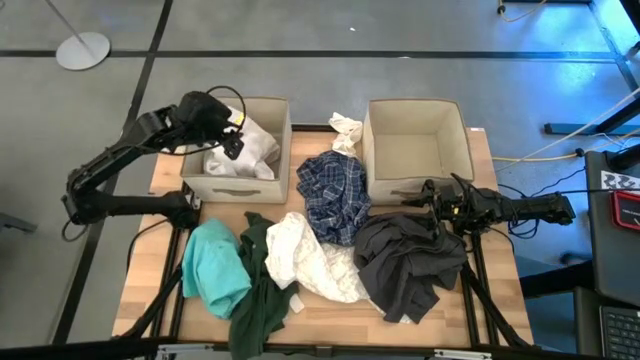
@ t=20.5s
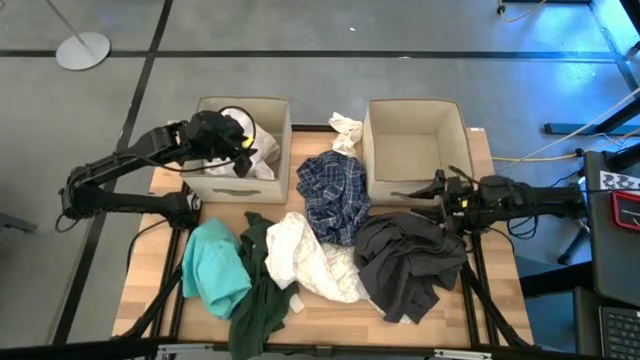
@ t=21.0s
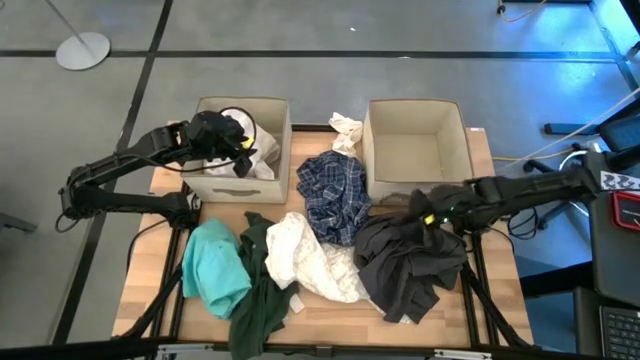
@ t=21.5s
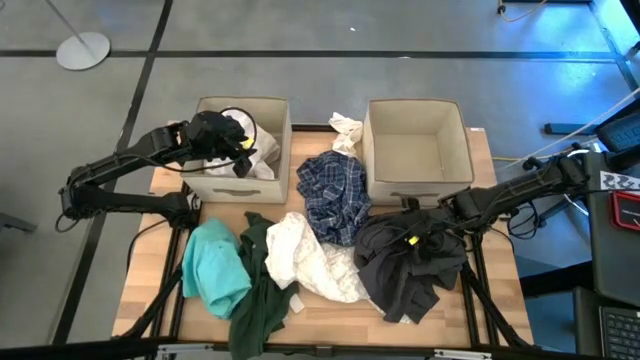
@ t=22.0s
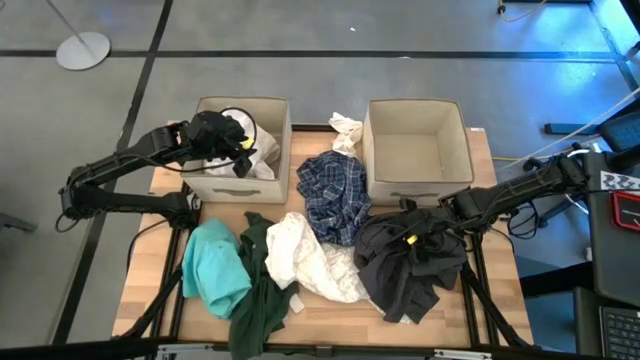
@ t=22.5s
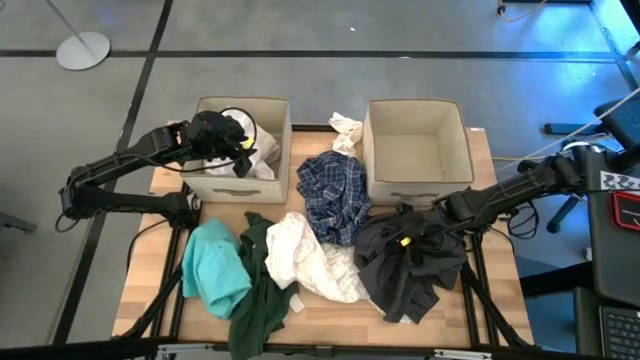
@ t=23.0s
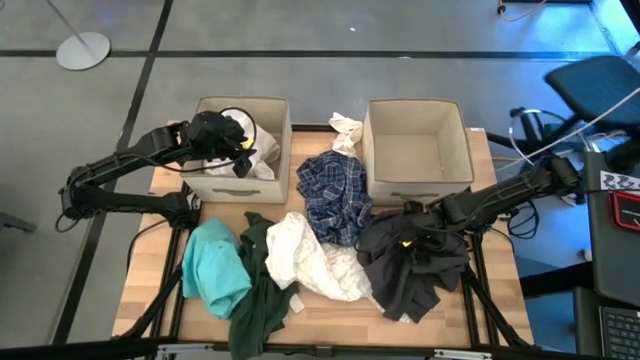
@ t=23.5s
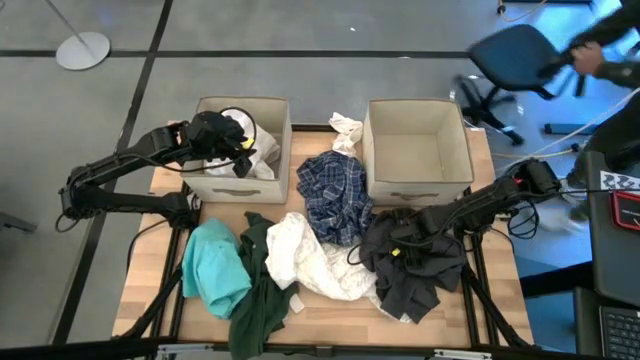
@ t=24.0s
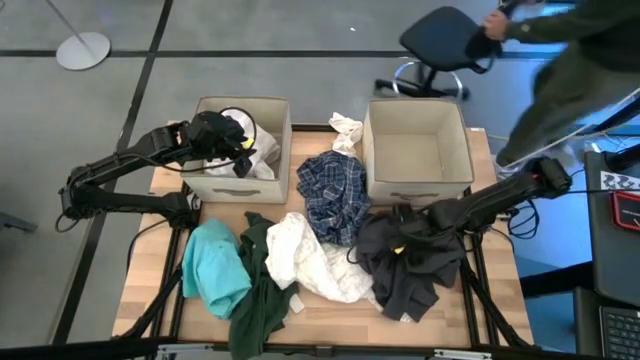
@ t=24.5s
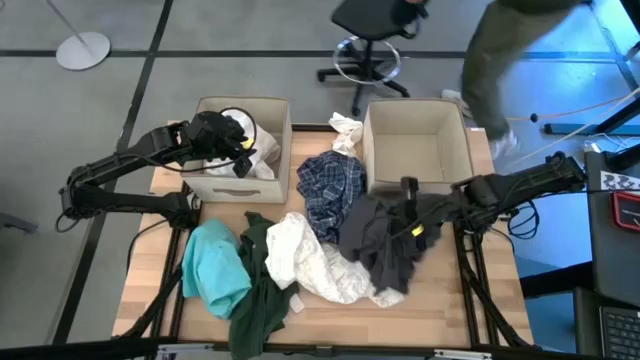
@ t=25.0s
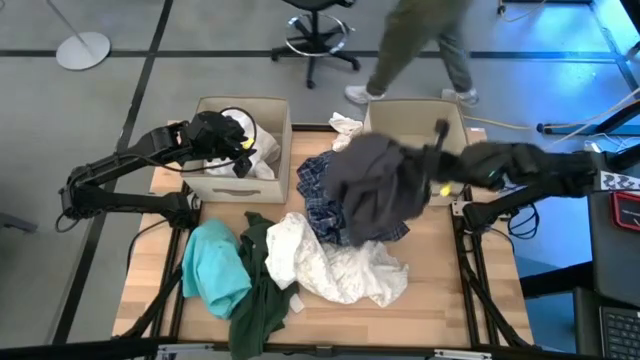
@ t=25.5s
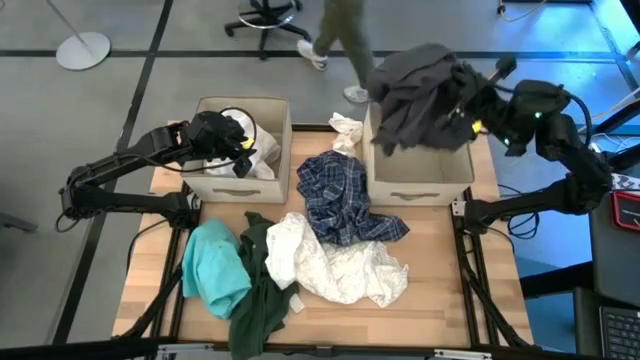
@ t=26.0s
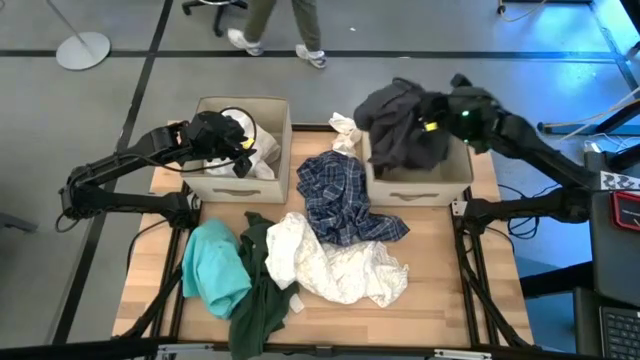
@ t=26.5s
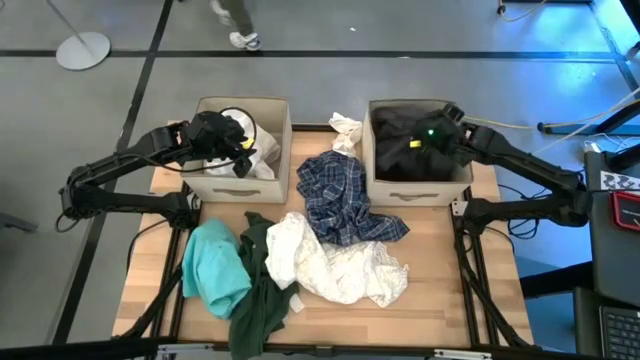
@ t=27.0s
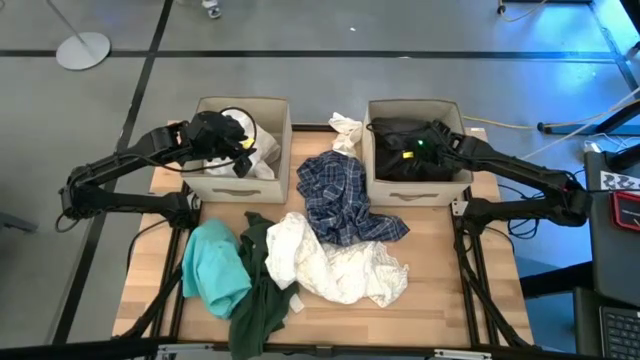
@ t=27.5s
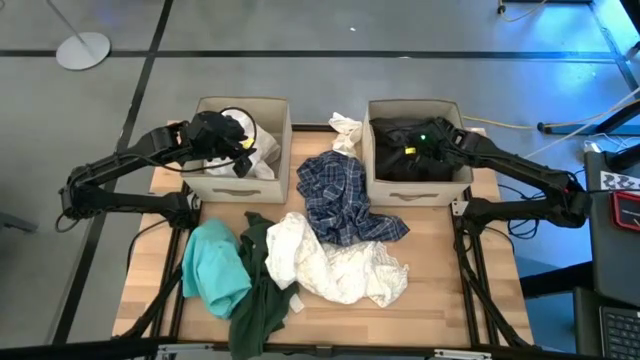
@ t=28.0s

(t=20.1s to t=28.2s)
Task: Sort clothes
Put the gray jacket into the right brown bin

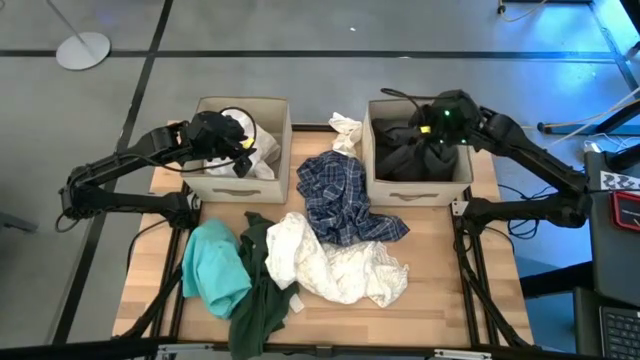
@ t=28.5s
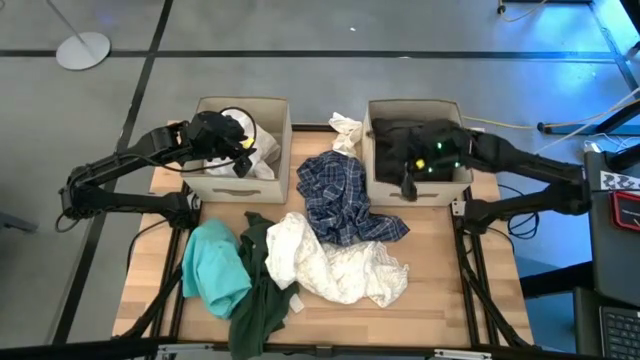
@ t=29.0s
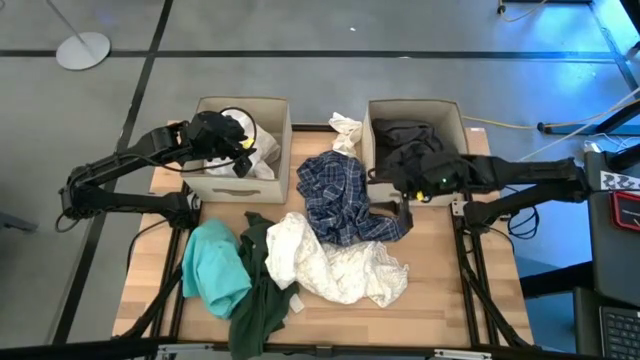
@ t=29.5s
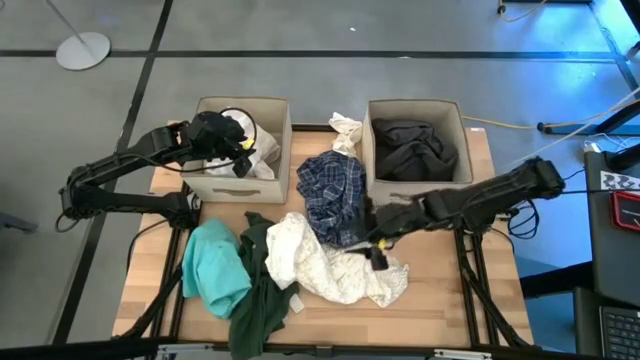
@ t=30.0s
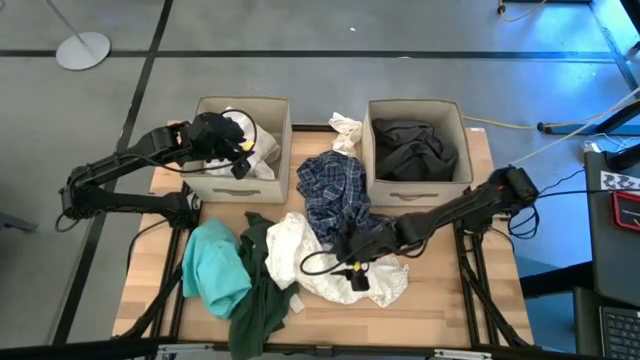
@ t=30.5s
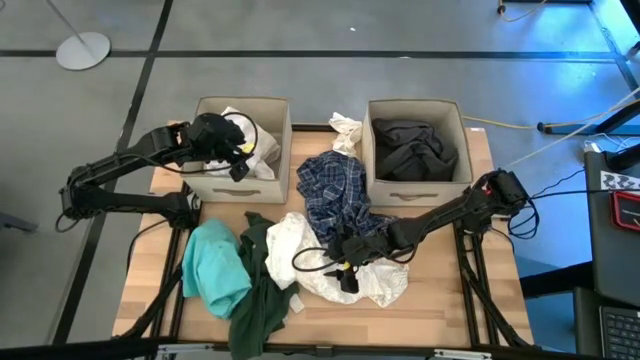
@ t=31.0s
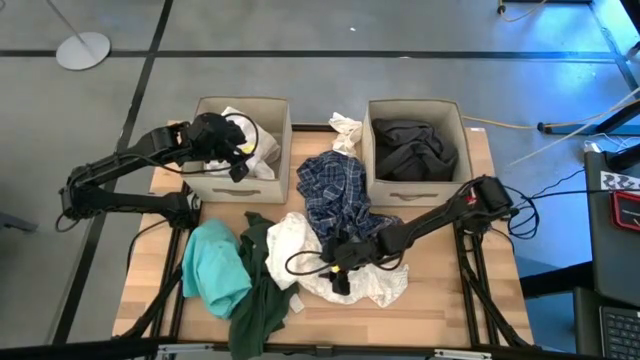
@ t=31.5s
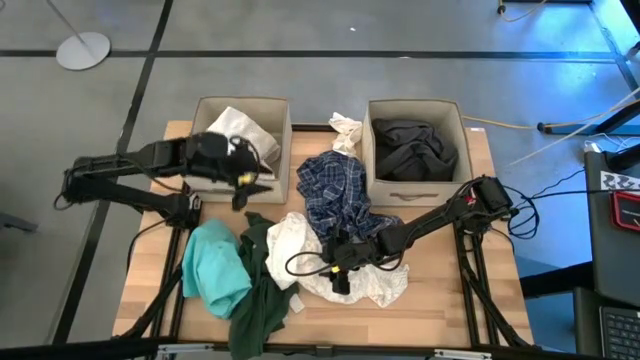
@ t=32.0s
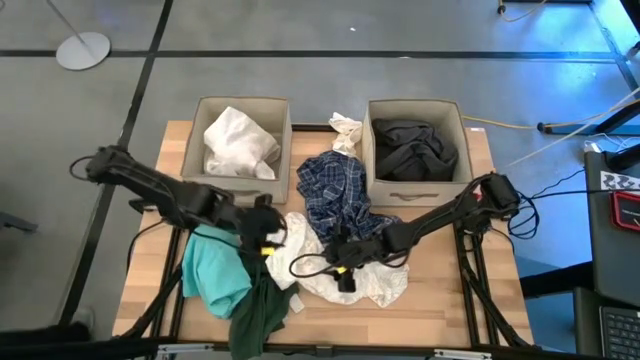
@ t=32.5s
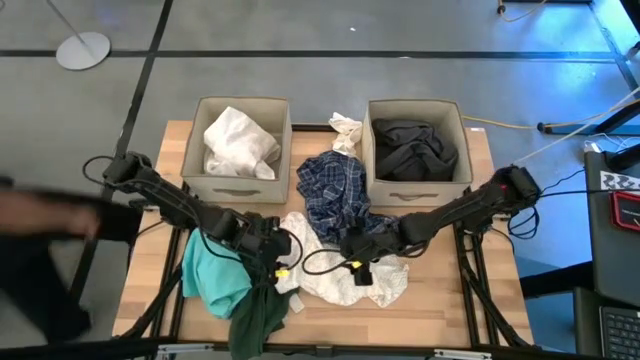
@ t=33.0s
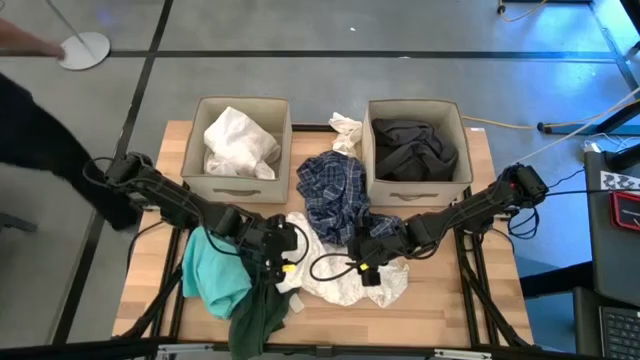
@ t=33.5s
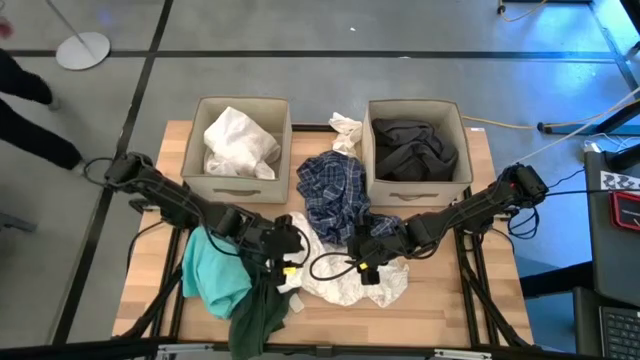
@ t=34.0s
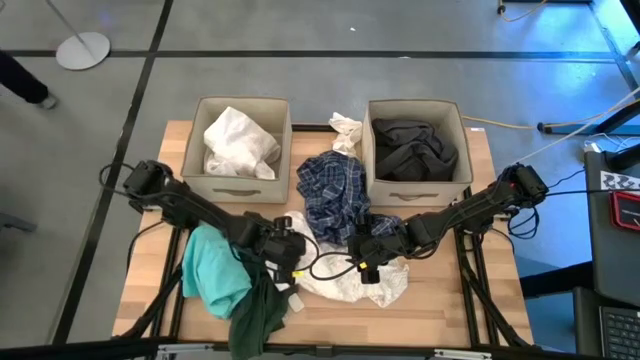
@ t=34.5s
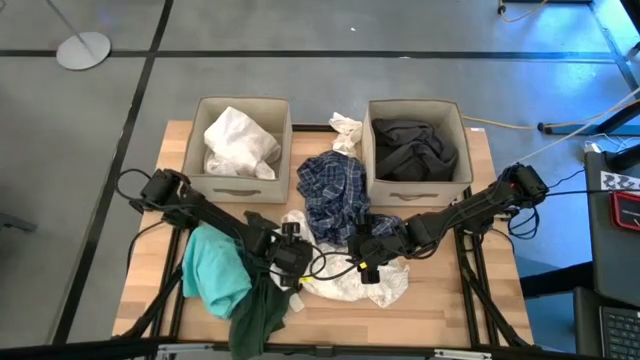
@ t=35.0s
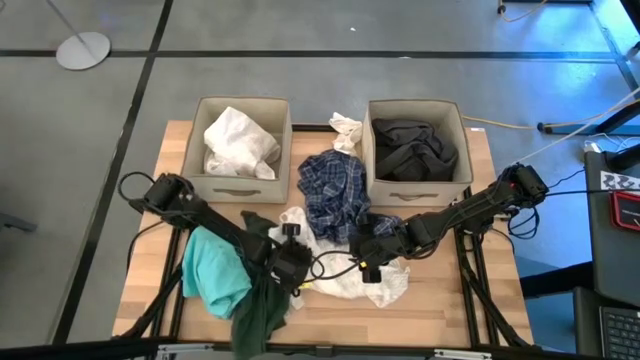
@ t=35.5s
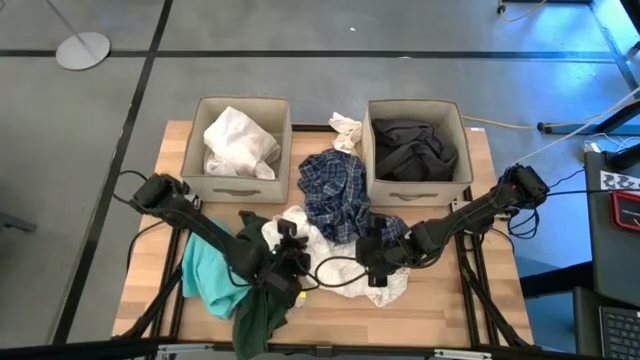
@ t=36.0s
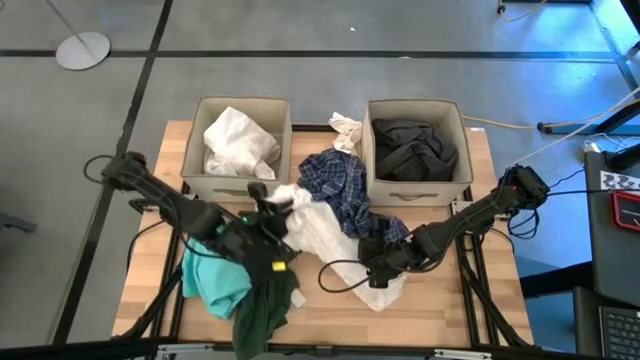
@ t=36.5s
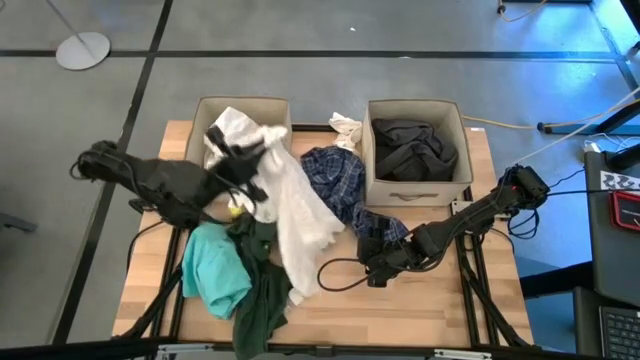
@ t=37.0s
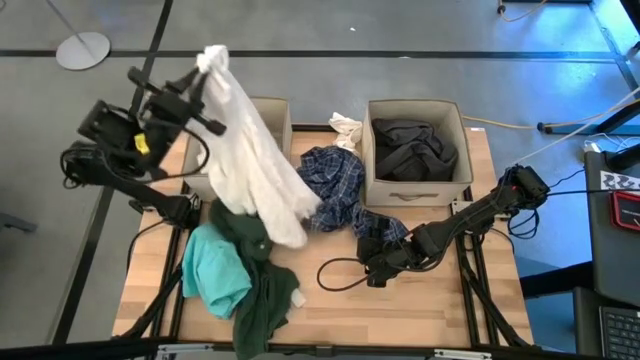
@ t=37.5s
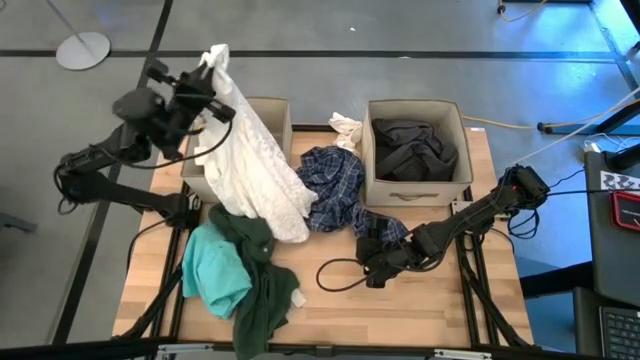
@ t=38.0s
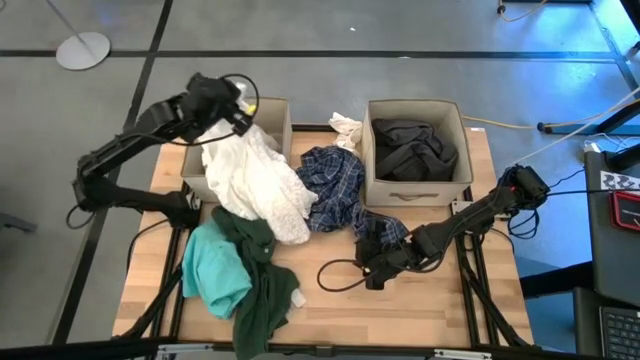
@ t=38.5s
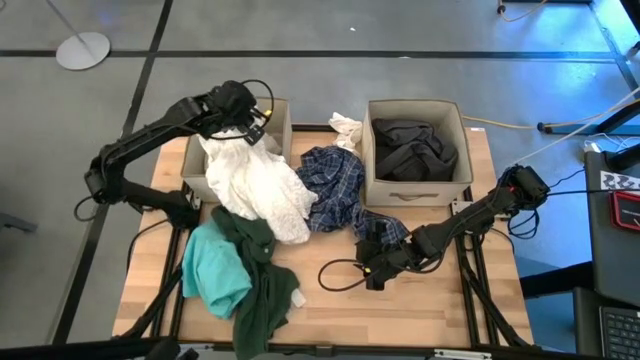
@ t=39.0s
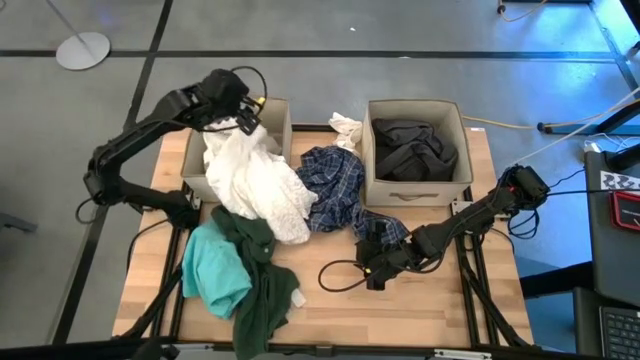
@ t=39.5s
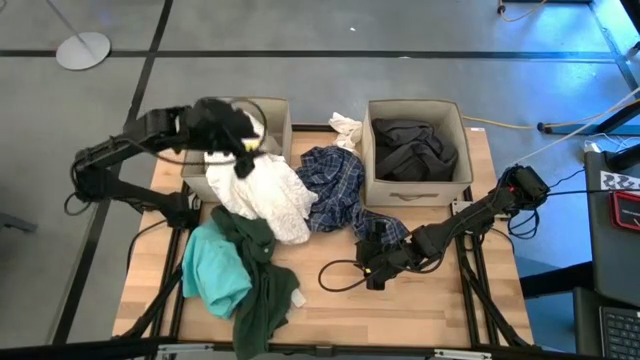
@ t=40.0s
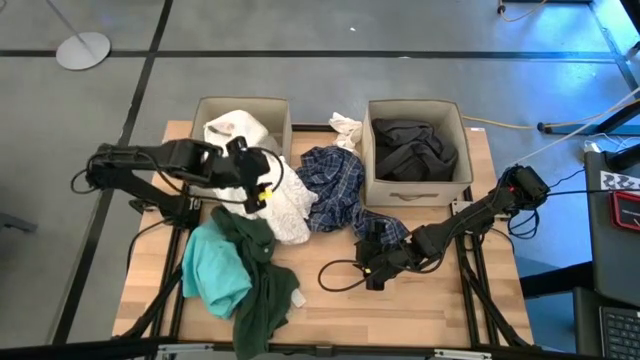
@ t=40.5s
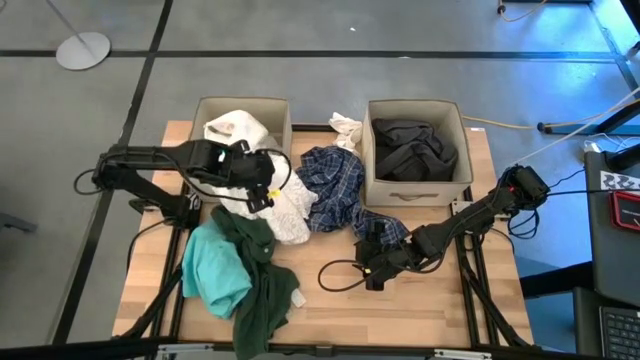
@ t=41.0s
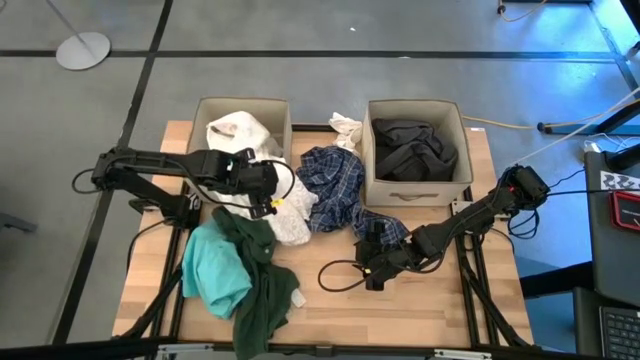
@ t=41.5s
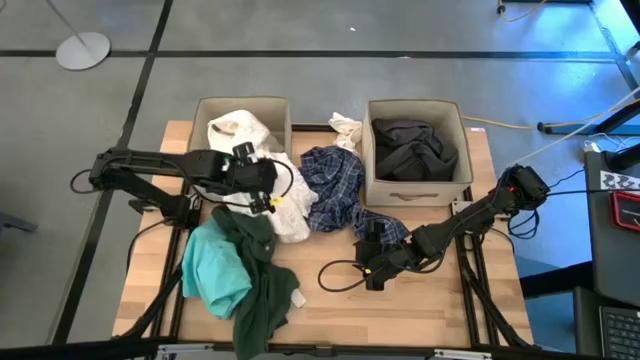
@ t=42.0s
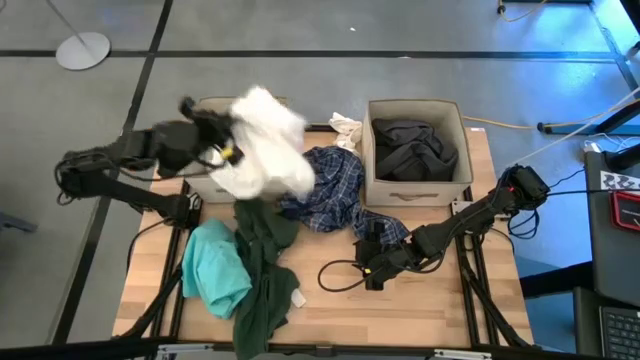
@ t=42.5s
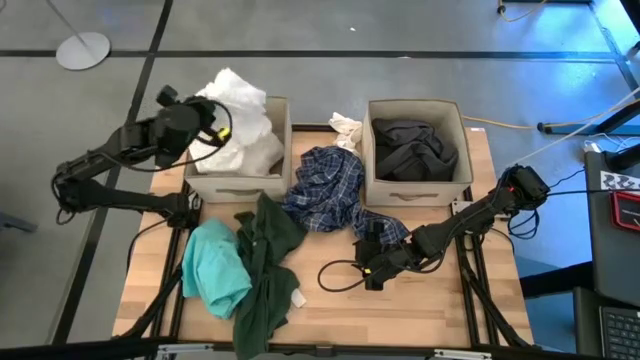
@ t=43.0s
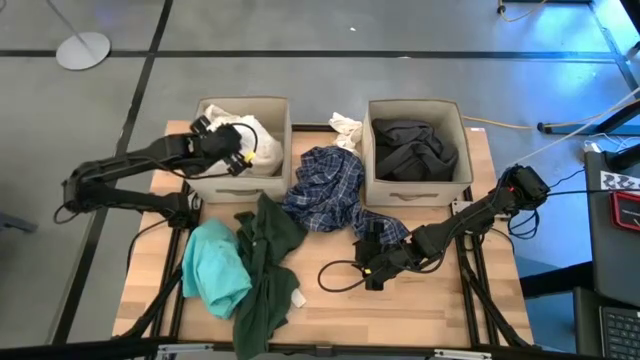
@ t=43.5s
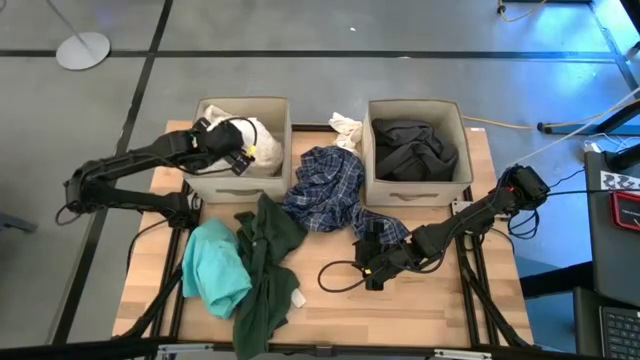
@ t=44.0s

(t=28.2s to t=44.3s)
Put the white shirt into the left brown bin
